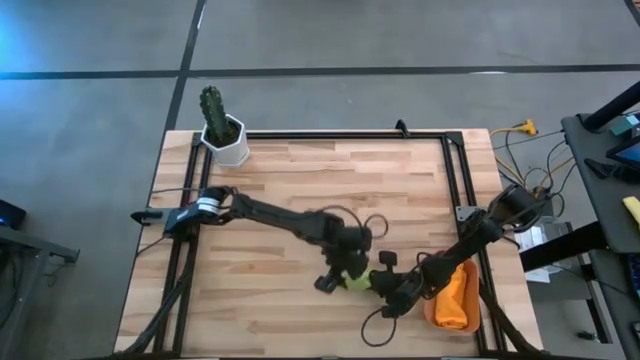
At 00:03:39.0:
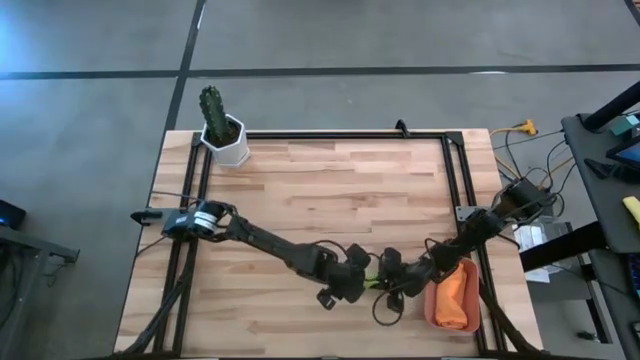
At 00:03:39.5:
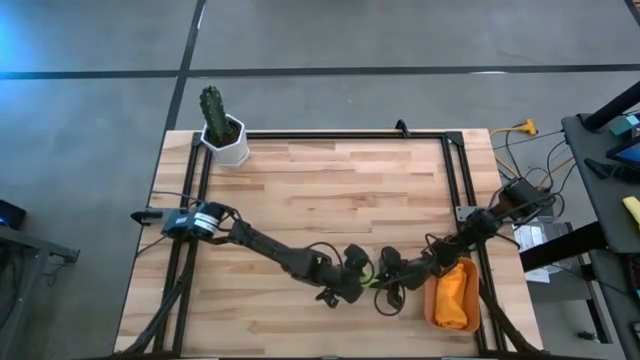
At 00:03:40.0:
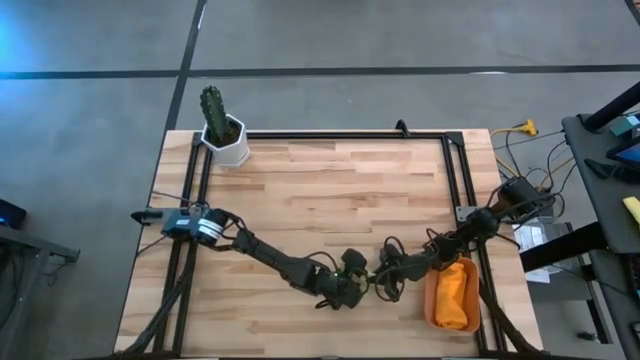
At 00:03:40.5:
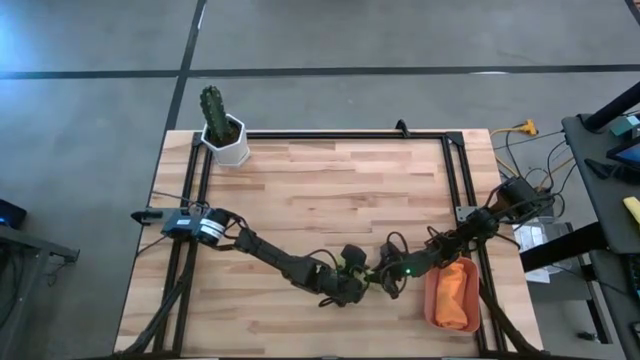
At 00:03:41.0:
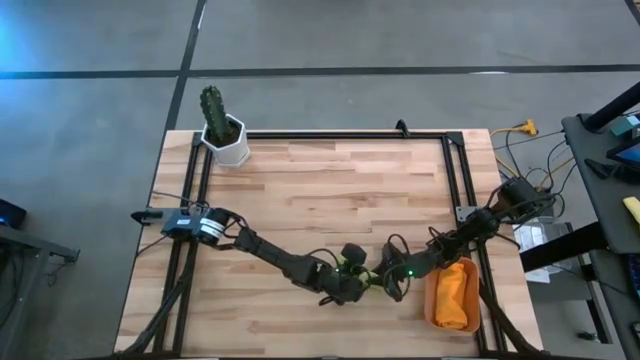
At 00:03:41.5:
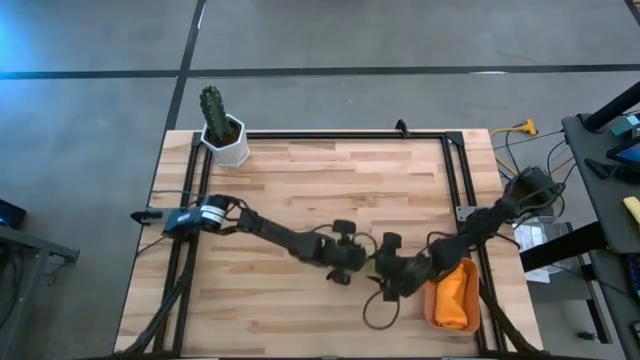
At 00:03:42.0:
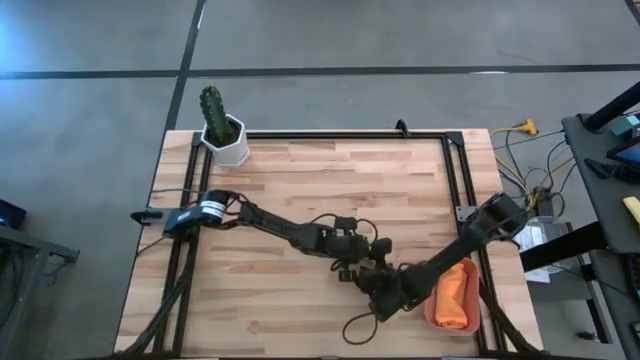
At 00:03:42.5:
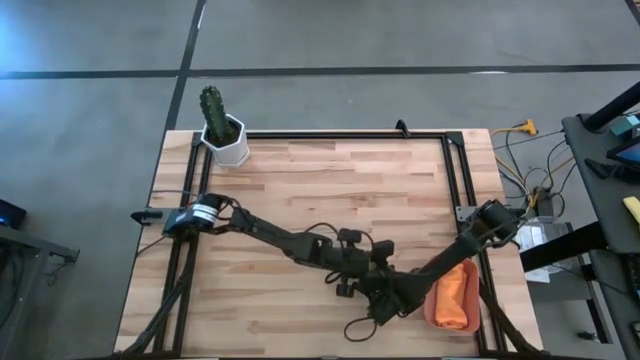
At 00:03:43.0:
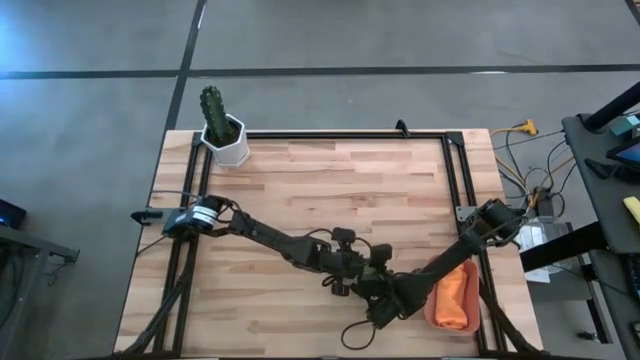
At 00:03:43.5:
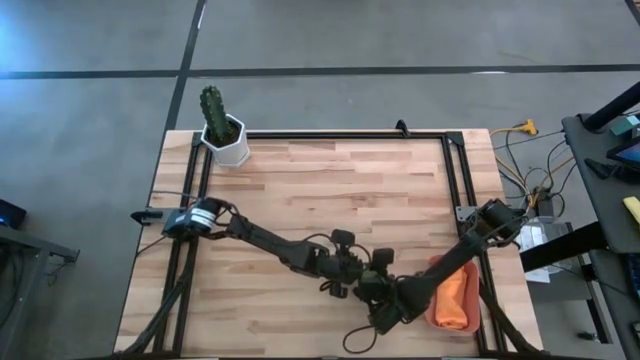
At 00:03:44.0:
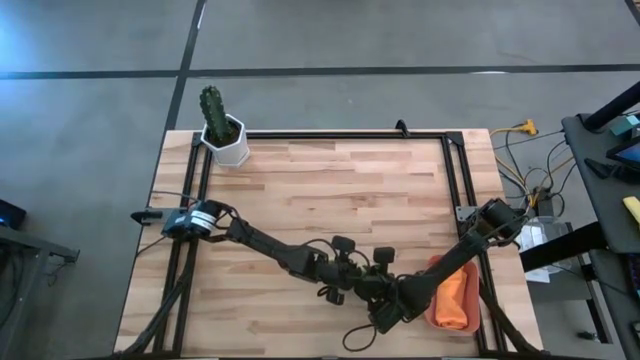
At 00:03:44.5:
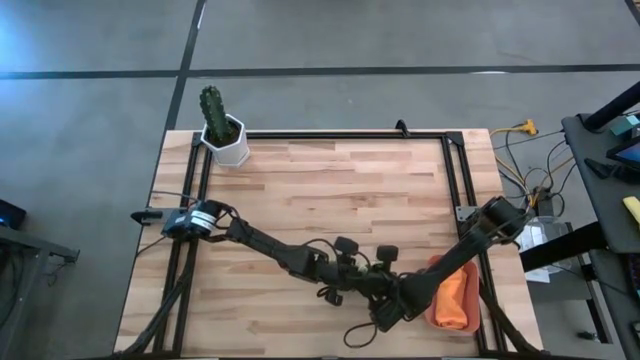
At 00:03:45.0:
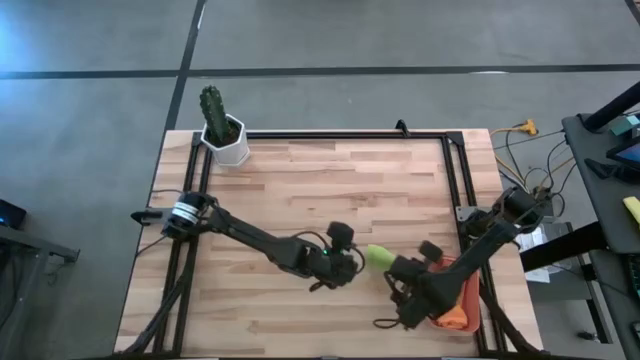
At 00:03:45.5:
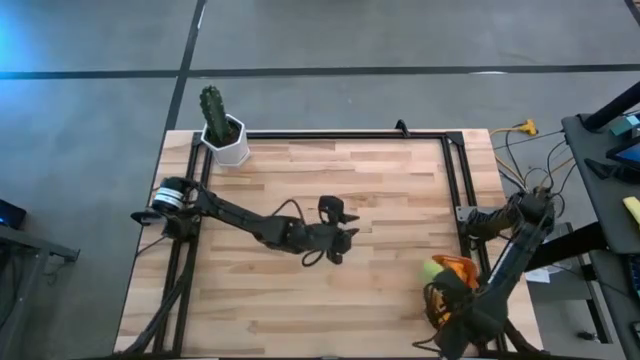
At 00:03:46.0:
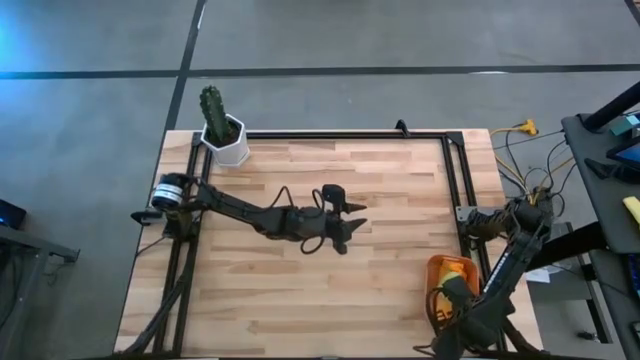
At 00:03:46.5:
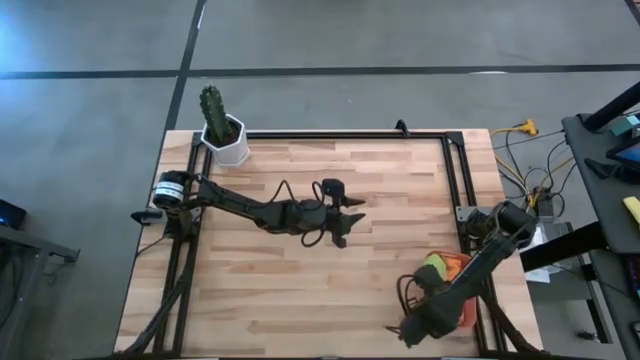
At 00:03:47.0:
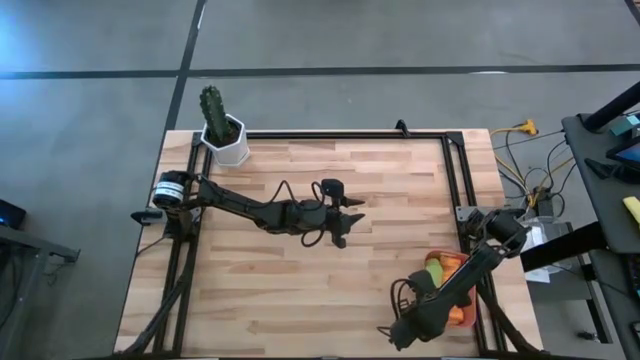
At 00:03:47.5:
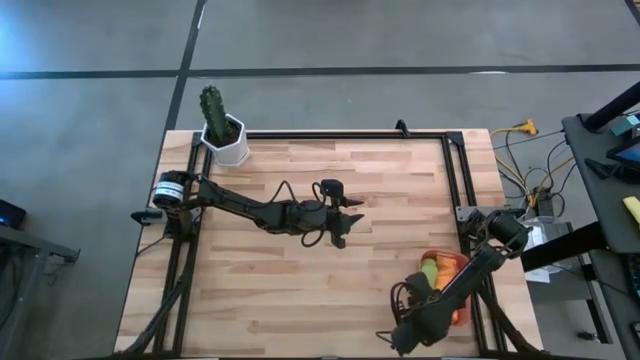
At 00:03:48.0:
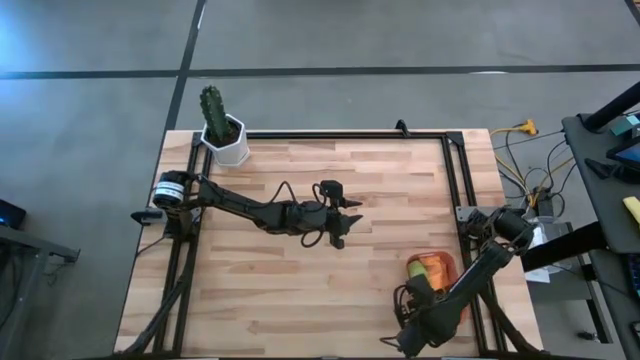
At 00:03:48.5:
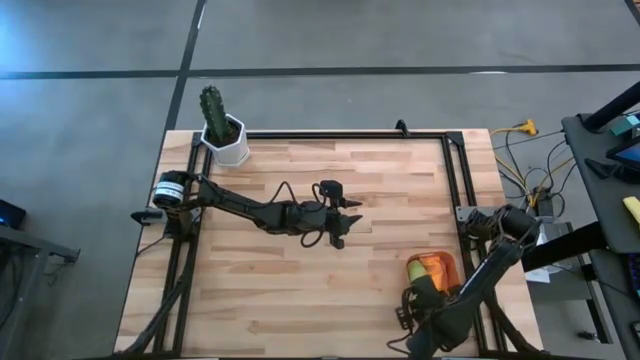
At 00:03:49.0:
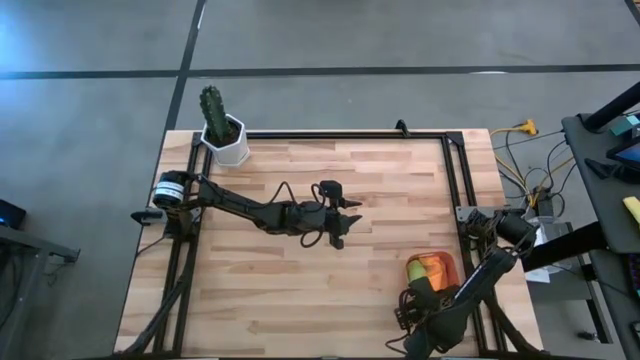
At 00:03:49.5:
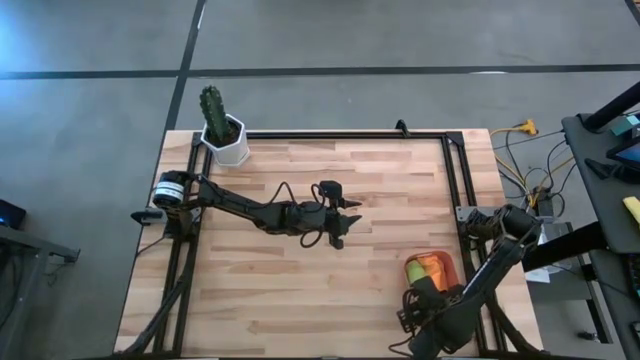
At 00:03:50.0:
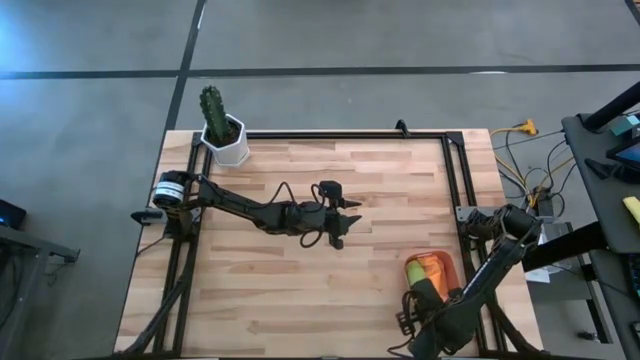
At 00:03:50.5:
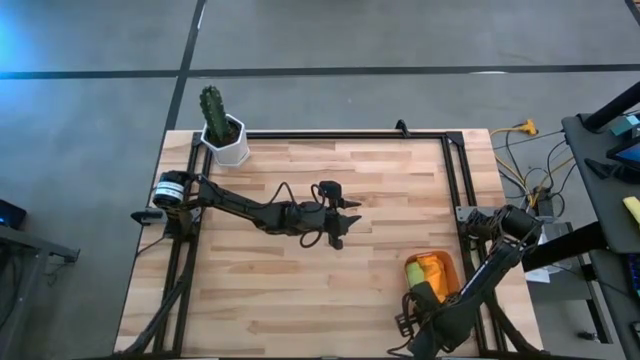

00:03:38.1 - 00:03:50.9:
Task: Roll microfiber towels into tight, uniform cylinder then place into a basket
Put the green microfiber cloth into the orange bin

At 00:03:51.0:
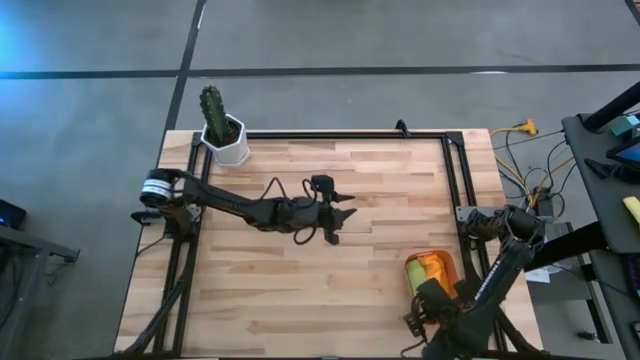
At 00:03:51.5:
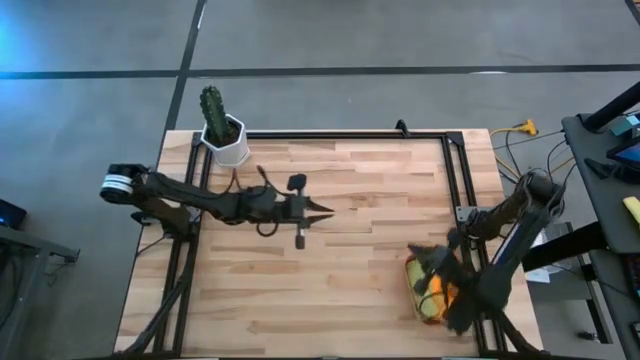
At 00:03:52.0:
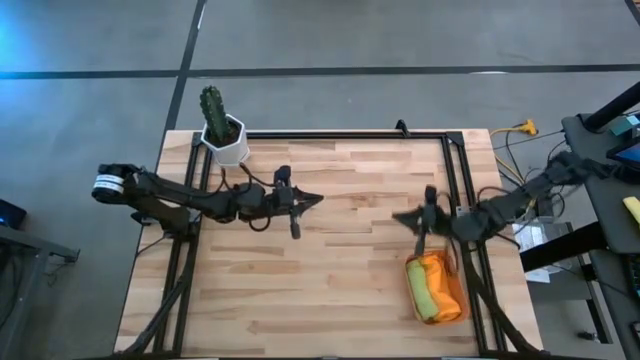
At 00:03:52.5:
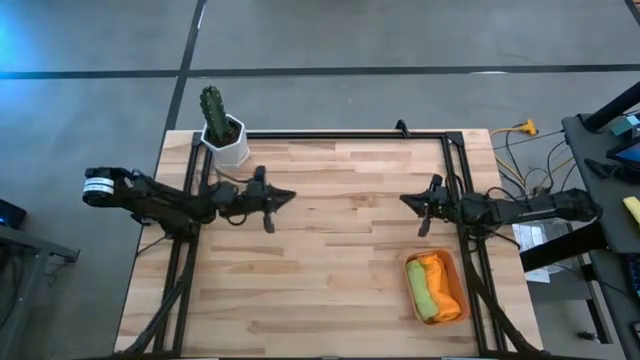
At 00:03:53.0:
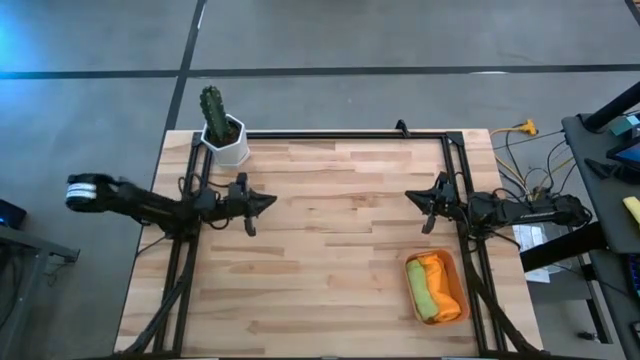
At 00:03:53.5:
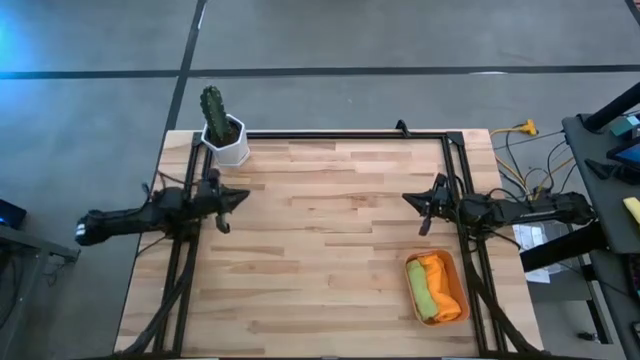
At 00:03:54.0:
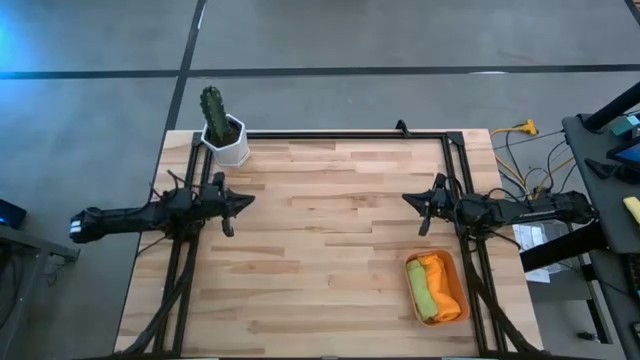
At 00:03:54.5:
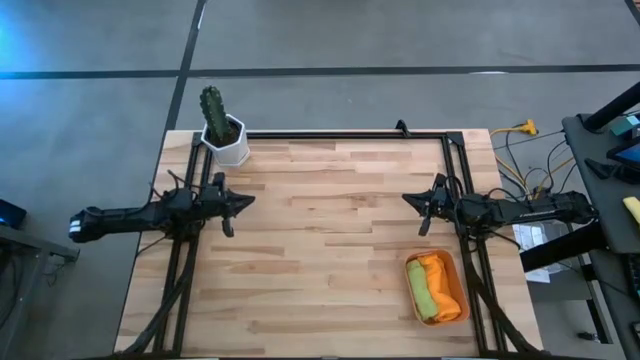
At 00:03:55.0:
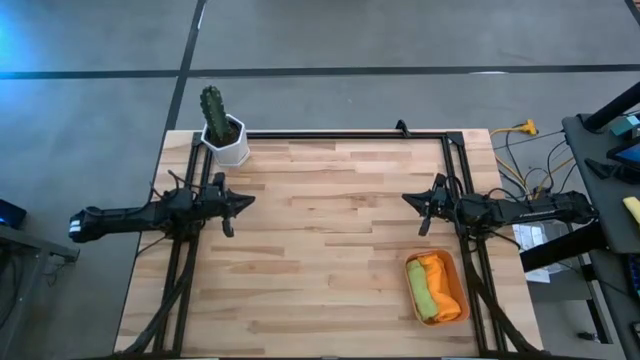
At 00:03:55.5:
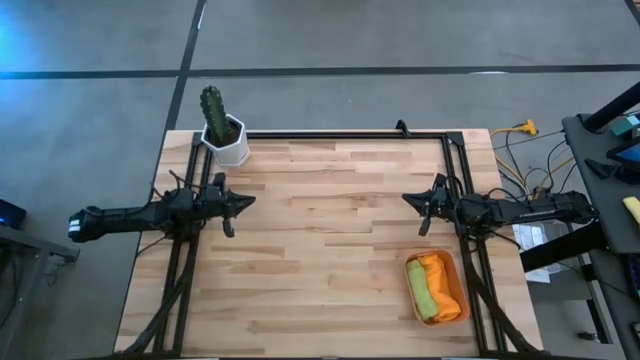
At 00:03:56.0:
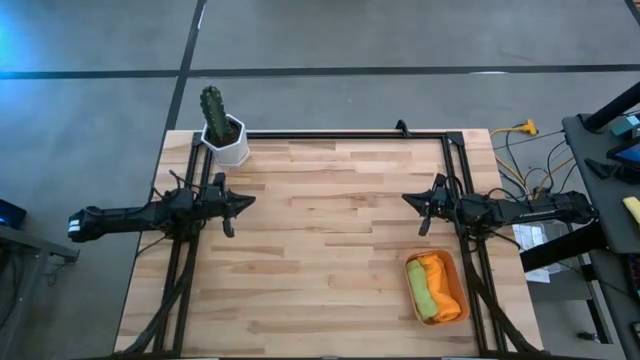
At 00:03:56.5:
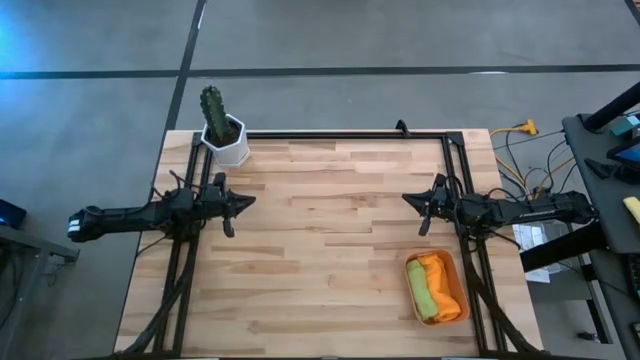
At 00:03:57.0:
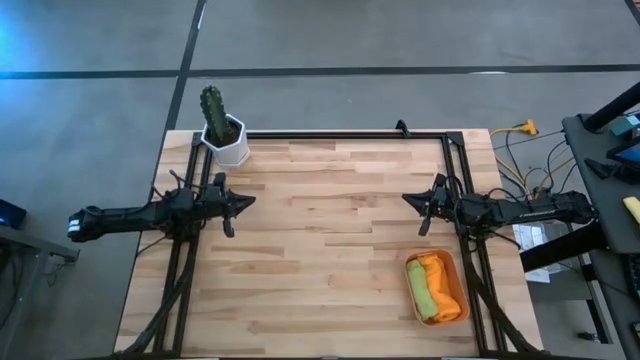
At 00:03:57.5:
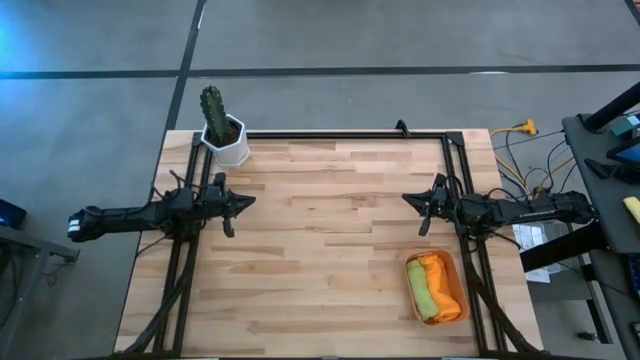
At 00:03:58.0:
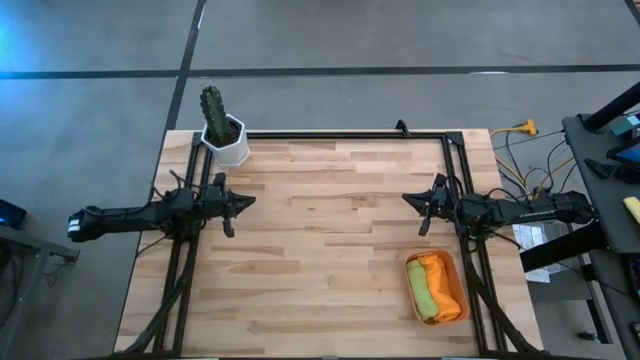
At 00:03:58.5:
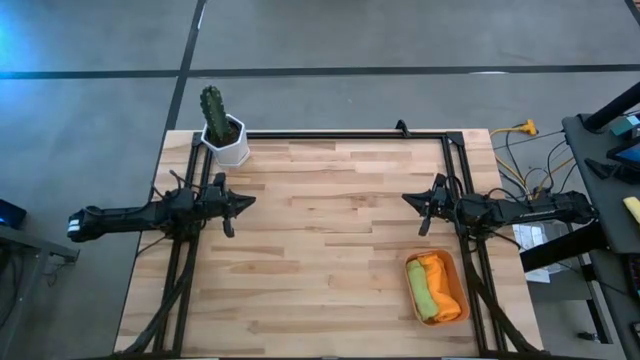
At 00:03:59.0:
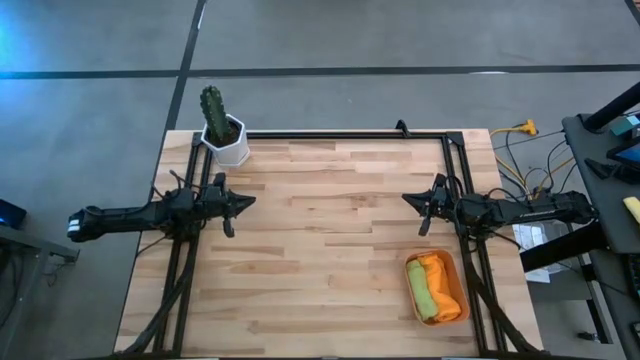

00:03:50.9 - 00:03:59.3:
Return to Home Position
